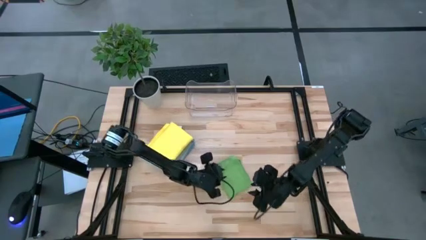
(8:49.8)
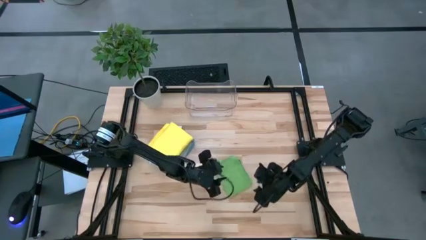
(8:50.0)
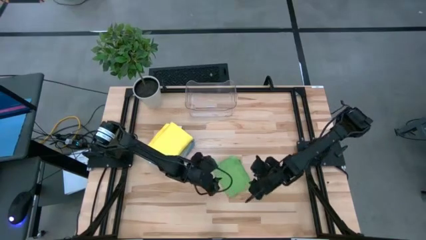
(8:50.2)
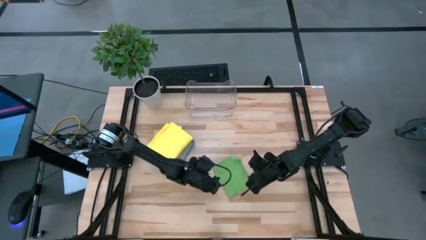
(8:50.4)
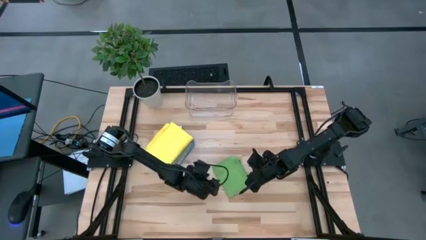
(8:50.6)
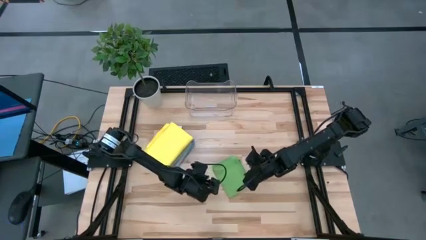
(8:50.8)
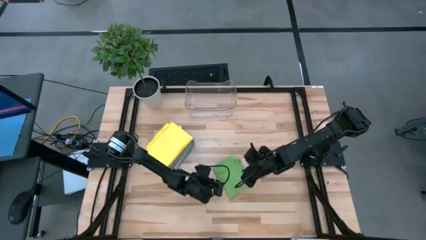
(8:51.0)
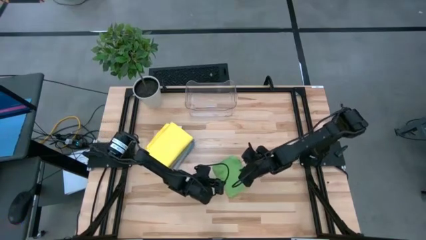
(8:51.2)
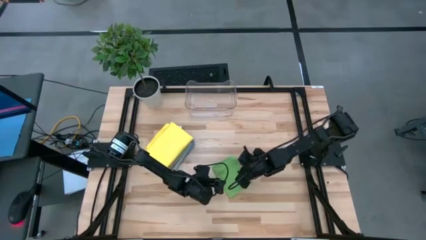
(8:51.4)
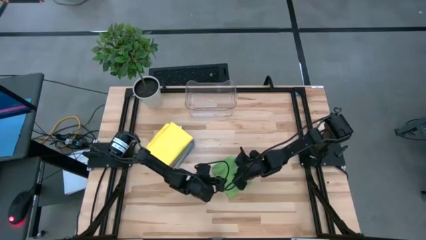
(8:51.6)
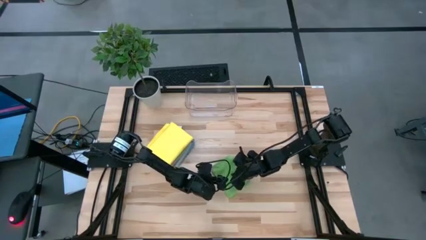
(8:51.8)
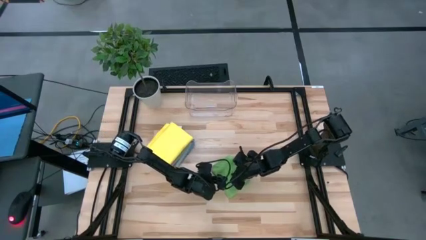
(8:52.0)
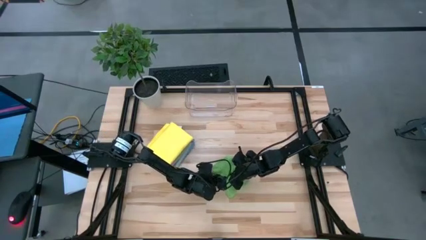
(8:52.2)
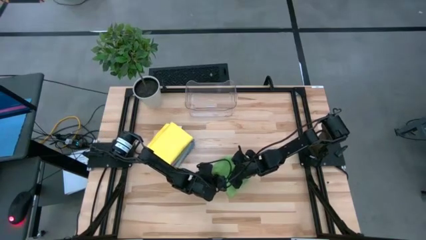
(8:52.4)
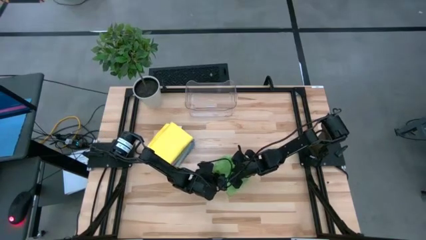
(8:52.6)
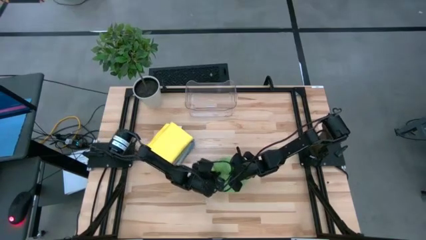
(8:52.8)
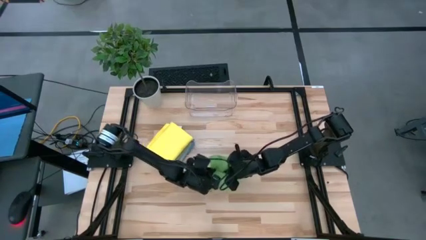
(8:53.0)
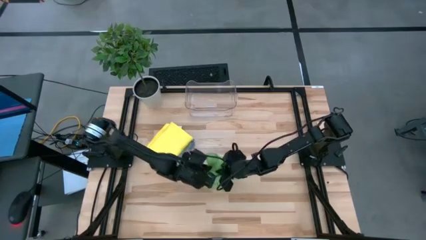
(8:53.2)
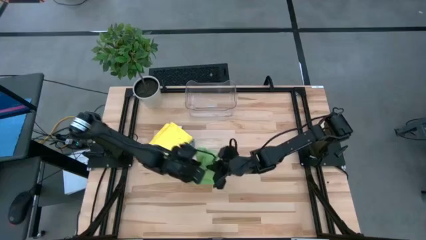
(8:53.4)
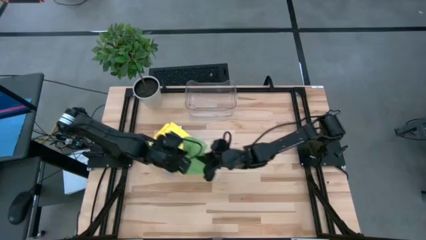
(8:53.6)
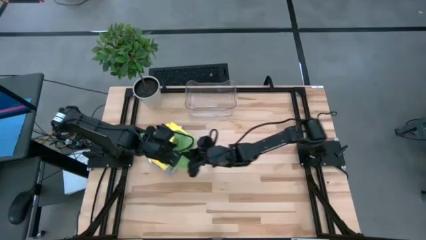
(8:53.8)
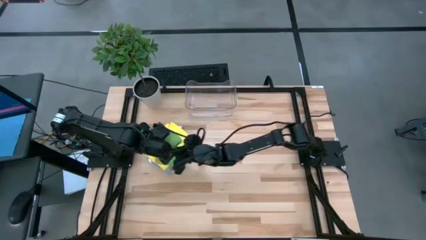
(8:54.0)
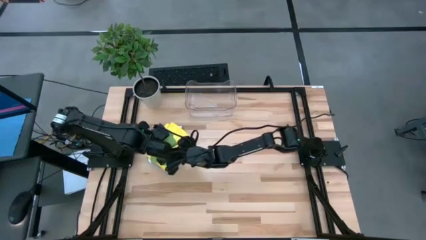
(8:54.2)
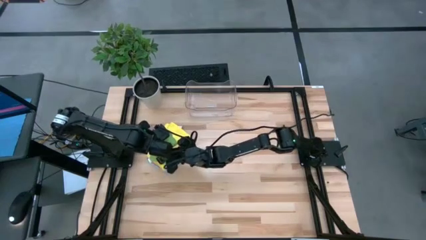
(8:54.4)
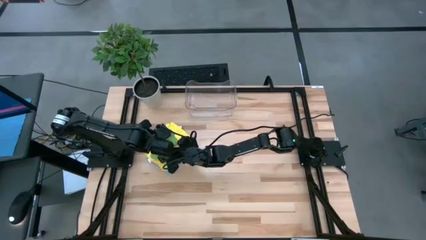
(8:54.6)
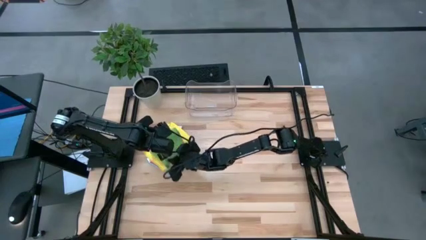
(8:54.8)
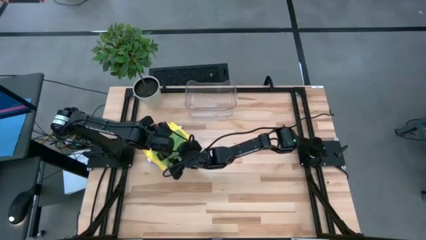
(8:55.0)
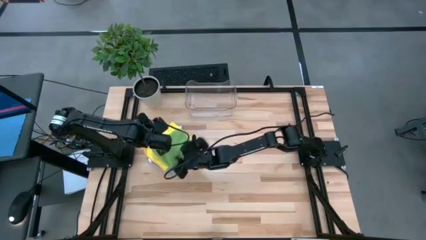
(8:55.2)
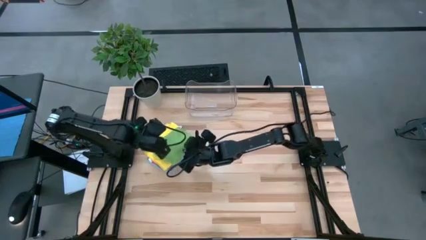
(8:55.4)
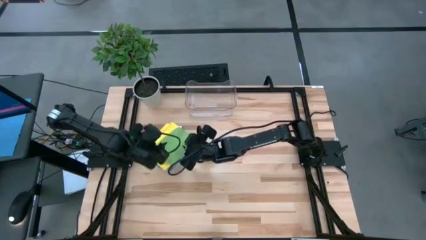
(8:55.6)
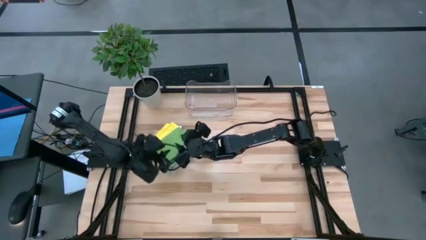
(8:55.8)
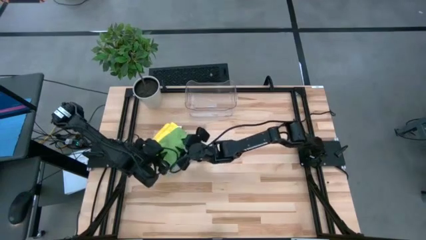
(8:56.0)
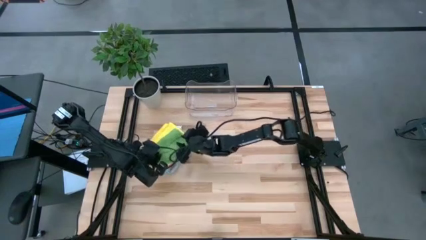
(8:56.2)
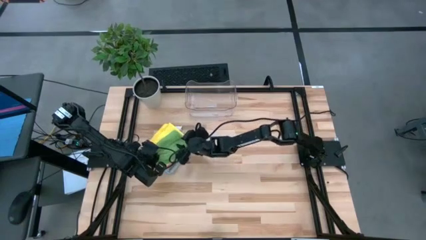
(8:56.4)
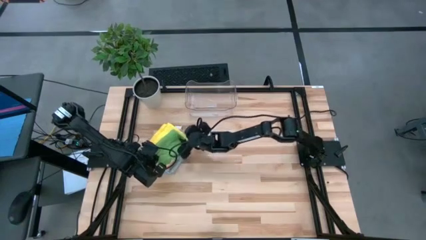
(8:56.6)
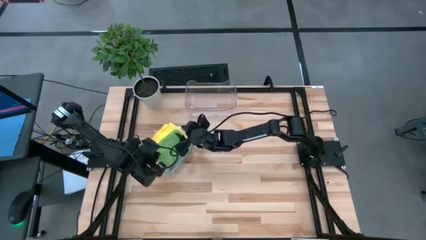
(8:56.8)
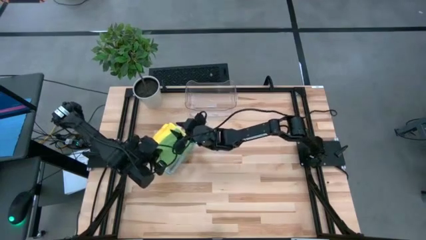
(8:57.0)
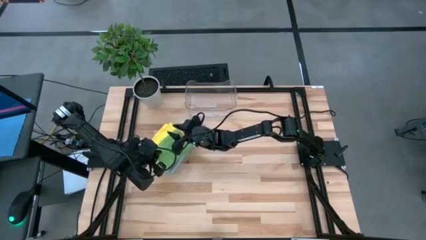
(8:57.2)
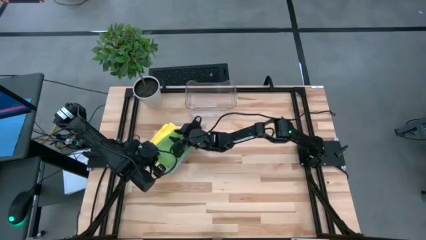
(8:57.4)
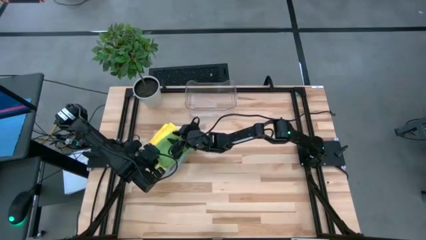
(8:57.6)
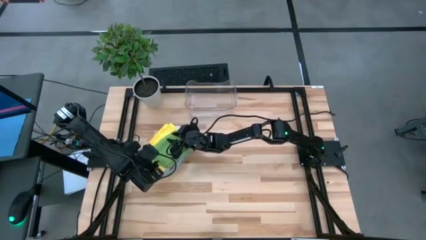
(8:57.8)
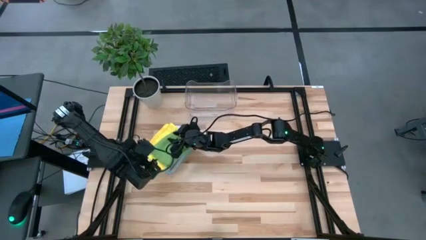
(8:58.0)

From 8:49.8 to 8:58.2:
Task: Fold microfiber towels
Stack the folded green microfiber cloth on top of the folded yellow microfiber cloth

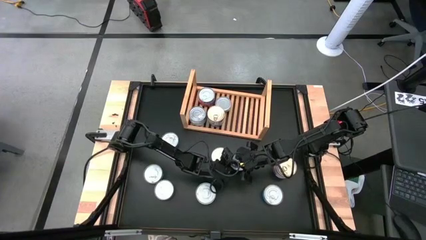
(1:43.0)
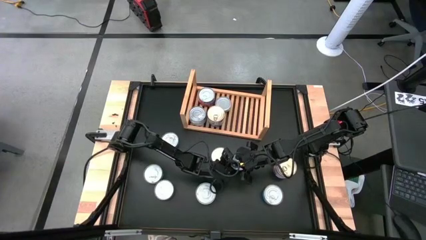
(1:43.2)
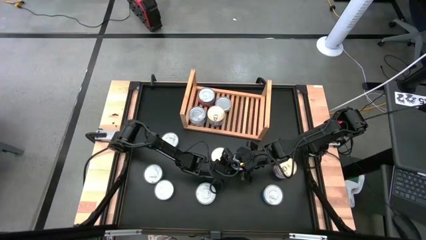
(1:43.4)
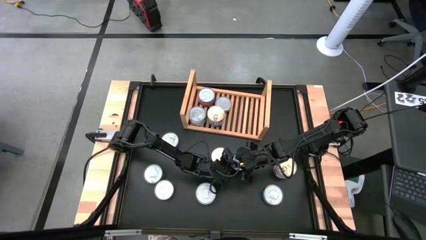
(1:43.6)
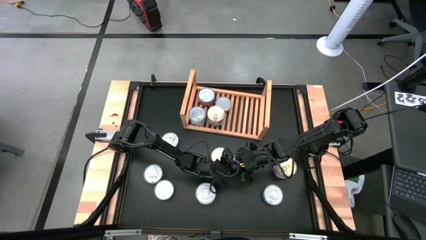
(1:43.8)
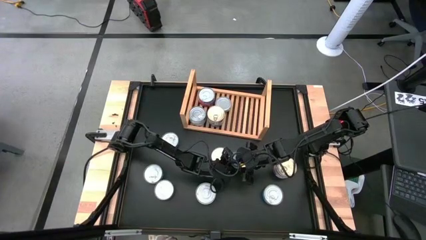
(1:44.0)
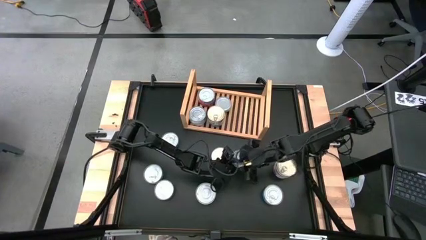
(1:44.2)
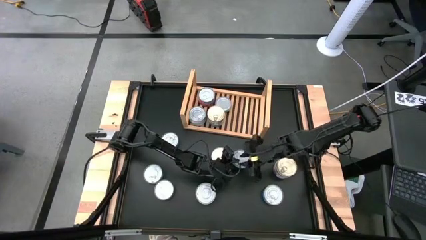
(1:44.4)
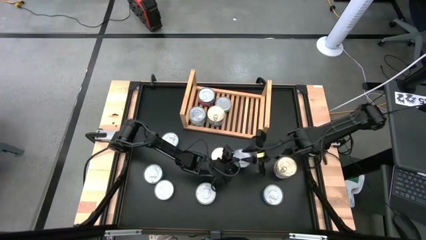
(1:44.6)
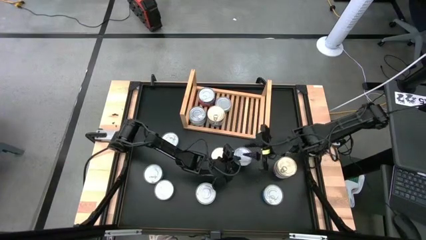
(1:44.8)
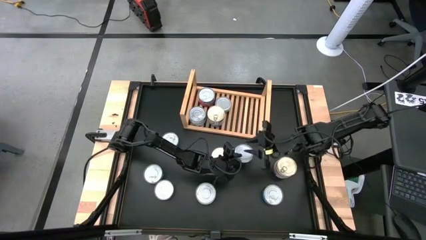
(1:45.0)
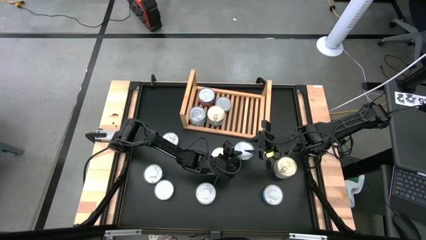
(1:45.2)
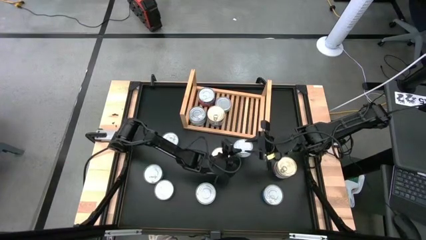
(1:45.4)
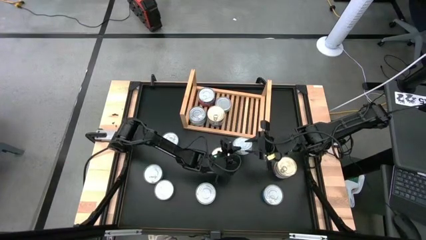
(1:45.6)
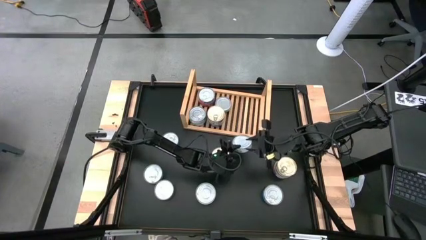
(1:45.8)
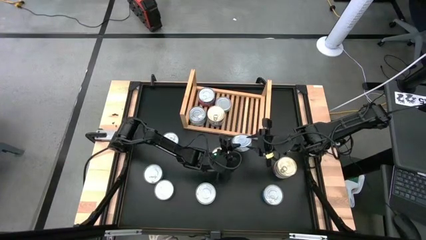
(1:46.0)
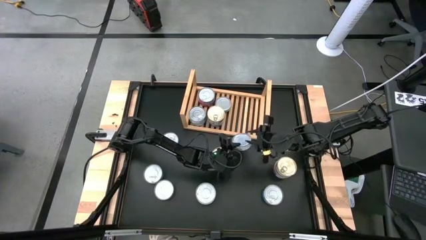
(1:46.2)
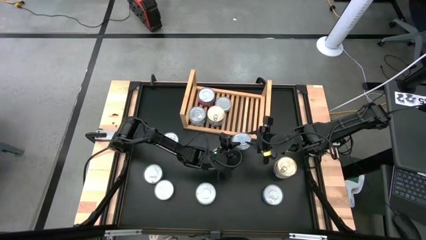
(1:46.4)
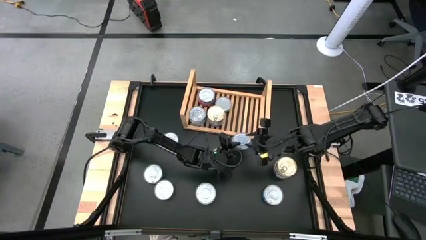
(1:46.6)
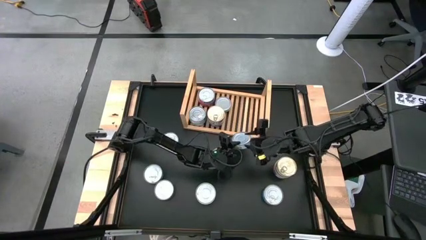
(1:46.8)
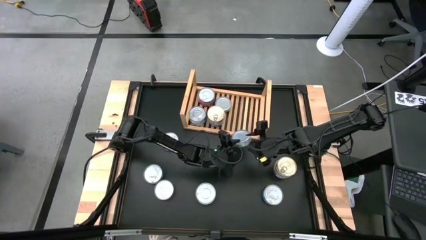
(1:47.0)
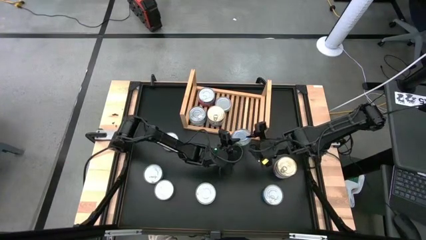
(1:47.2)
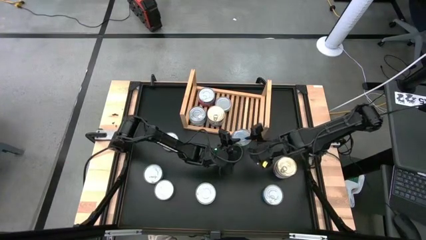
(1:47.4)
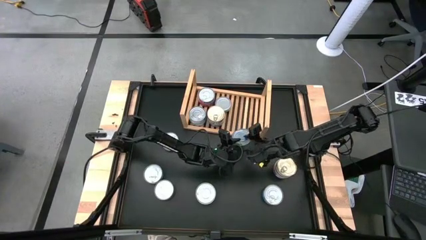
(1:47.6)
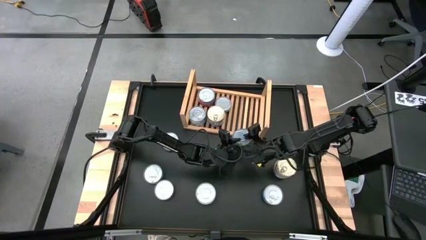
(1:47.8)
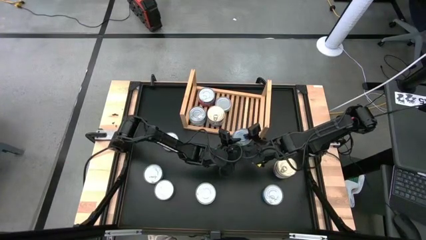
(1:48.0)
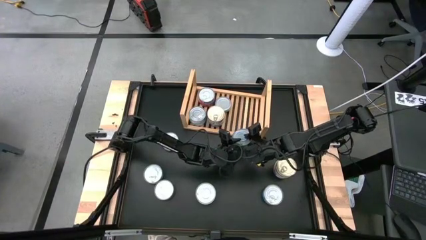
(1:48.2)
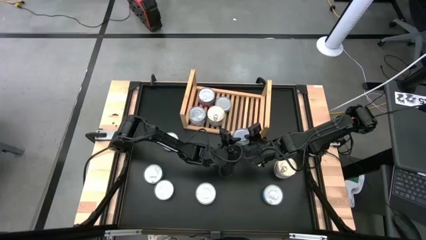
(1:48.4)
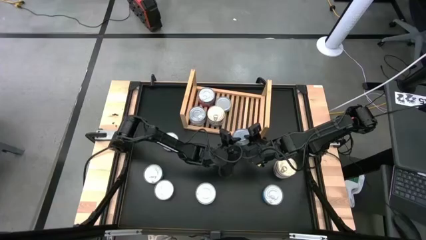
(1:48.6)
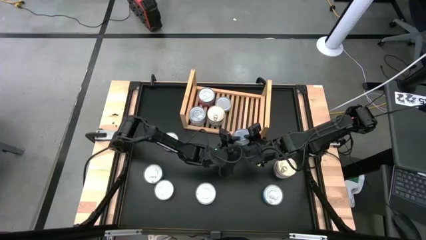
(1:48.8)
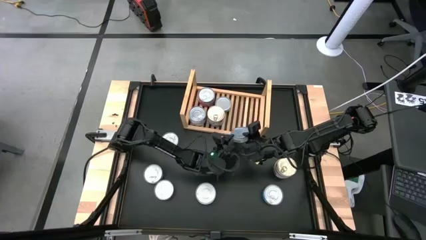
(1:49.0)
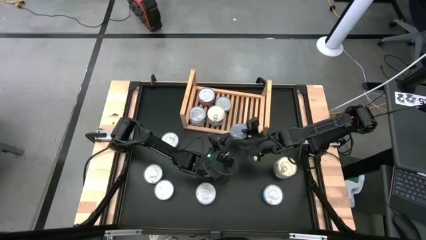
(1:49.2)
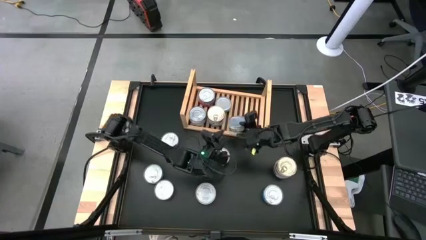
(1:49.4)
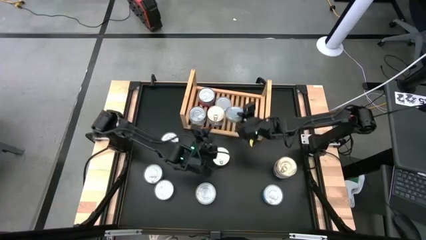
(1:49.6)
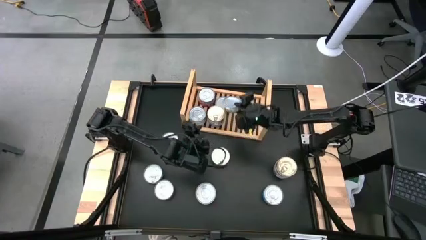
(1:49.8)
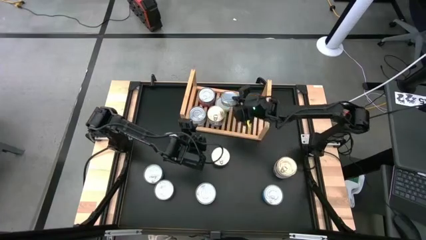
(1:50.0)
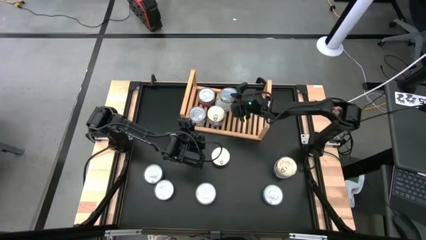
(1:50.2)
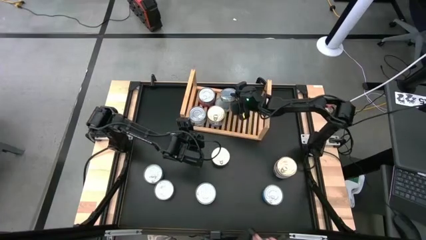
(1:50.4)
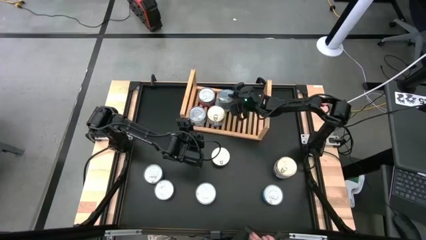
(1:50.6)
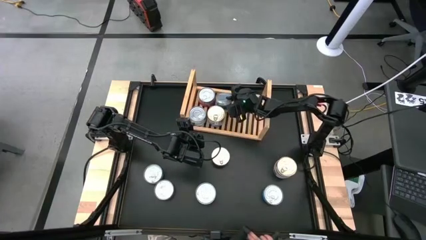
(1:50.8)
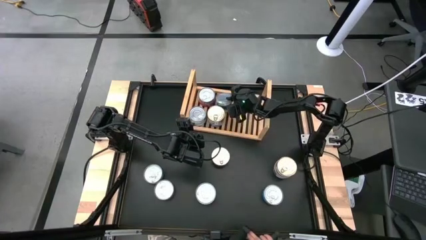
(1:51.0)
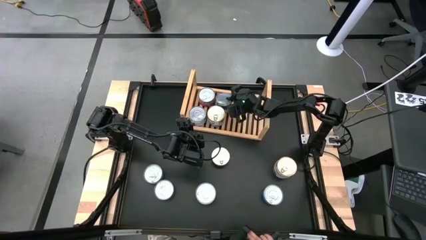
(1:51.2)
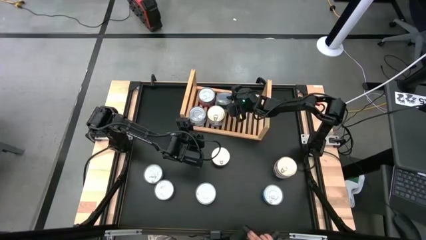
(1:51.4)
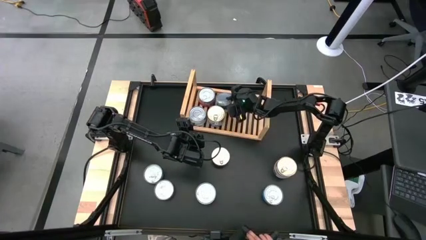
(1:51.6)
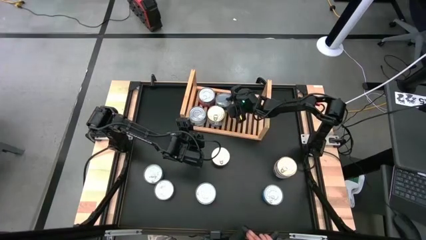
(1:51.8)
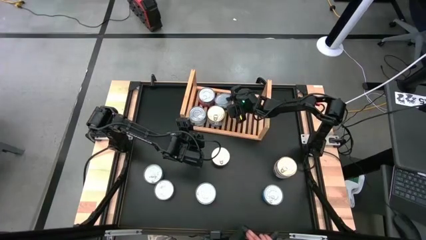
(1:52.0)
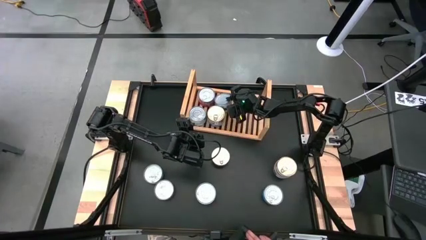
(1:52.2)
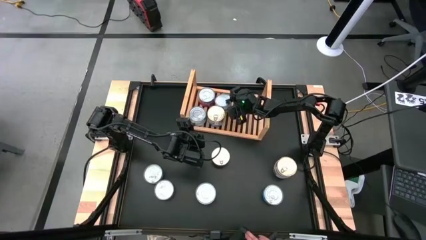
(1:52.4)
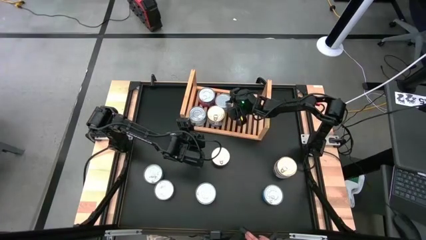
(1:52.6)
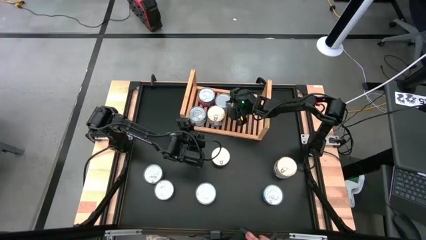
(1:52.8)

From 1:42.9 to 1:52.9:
Task: Stack canned seafood by type on shelf
Stack the green tuna can on top of the other green tuna can on the shelf
